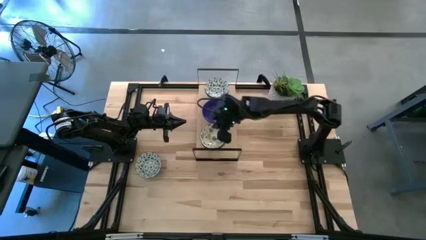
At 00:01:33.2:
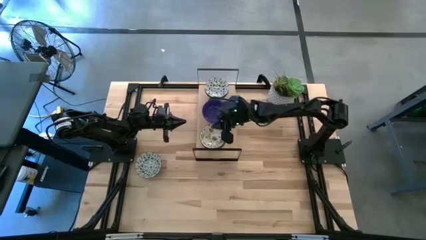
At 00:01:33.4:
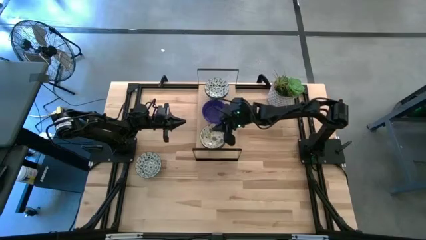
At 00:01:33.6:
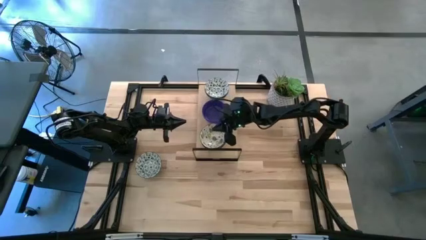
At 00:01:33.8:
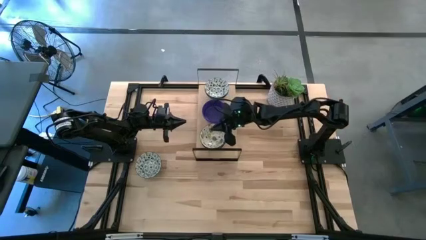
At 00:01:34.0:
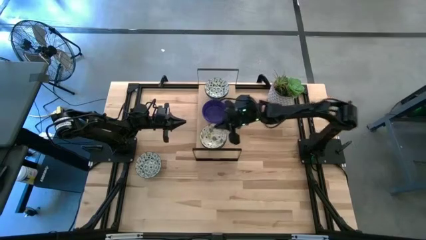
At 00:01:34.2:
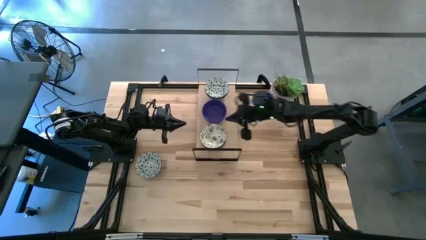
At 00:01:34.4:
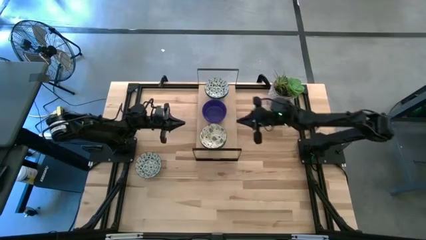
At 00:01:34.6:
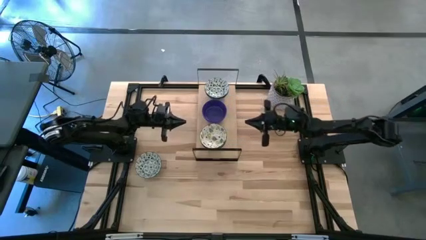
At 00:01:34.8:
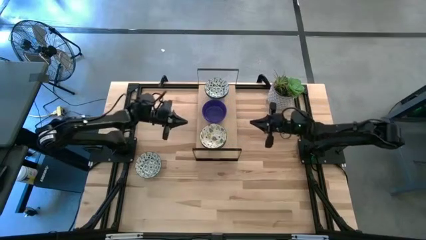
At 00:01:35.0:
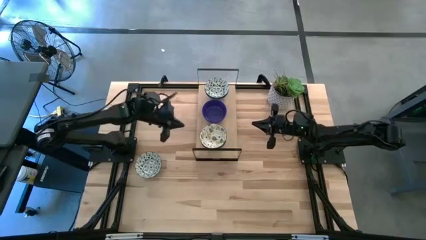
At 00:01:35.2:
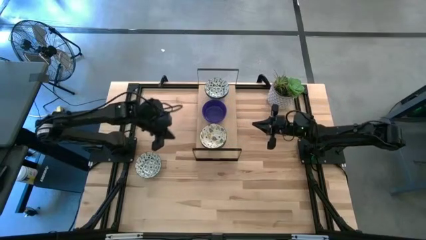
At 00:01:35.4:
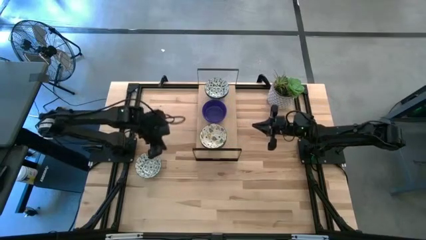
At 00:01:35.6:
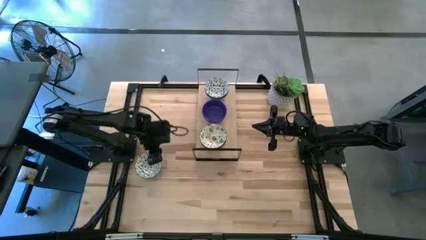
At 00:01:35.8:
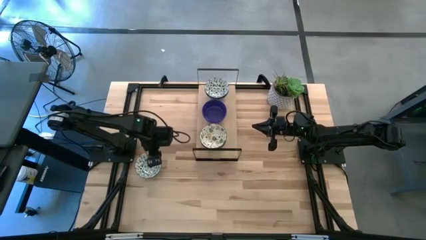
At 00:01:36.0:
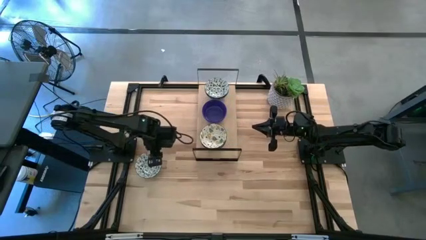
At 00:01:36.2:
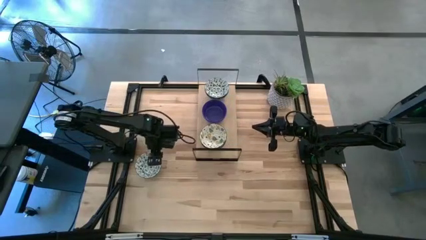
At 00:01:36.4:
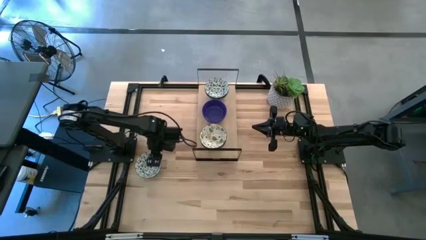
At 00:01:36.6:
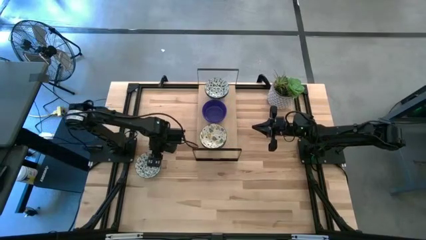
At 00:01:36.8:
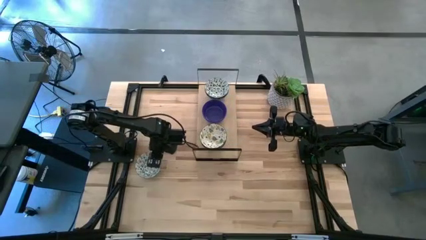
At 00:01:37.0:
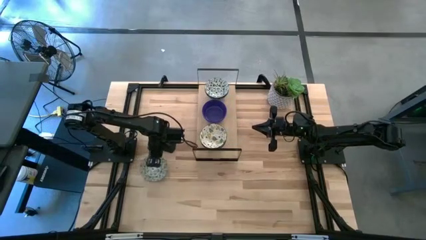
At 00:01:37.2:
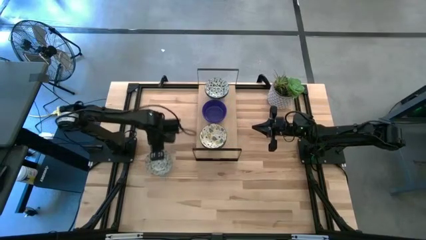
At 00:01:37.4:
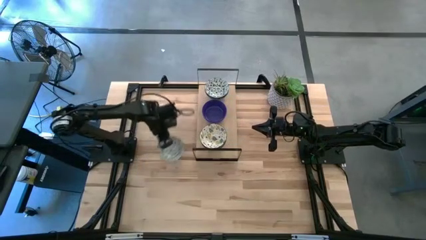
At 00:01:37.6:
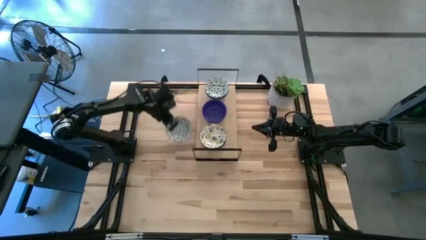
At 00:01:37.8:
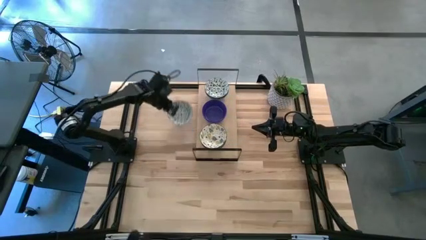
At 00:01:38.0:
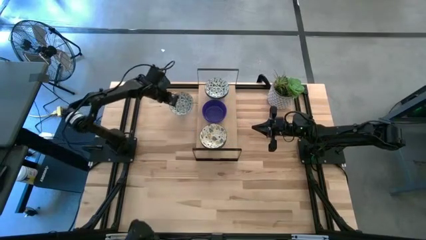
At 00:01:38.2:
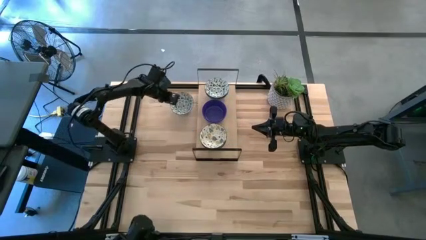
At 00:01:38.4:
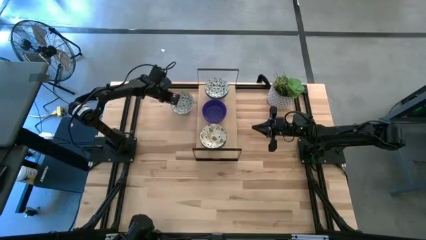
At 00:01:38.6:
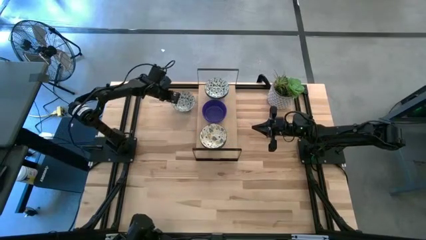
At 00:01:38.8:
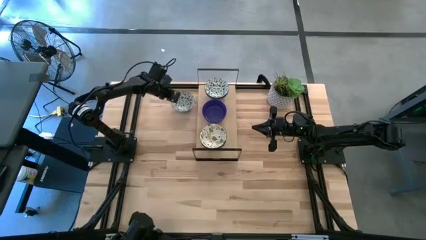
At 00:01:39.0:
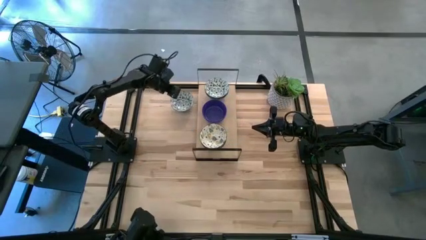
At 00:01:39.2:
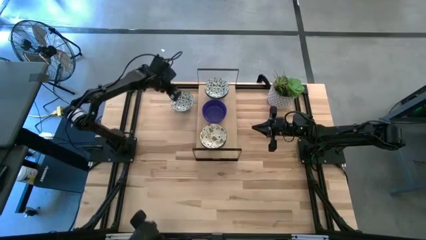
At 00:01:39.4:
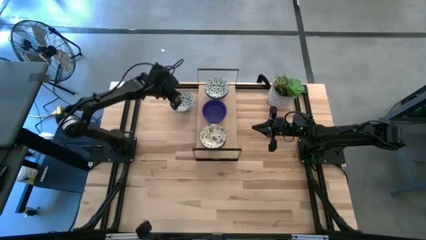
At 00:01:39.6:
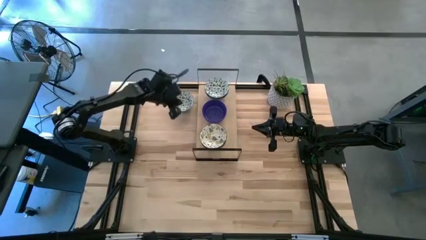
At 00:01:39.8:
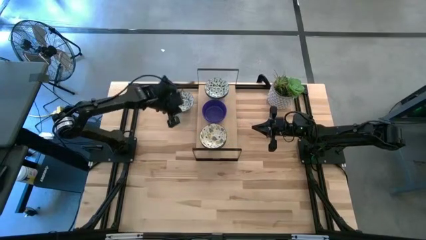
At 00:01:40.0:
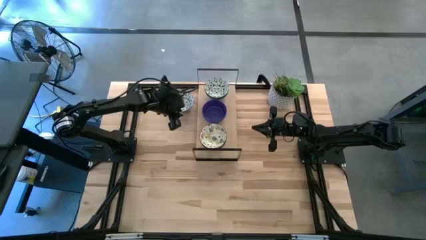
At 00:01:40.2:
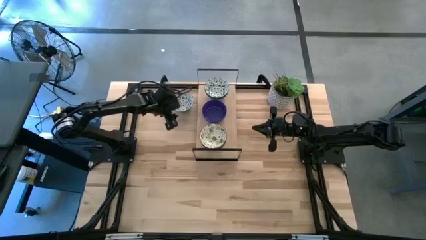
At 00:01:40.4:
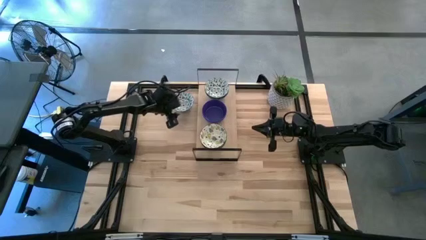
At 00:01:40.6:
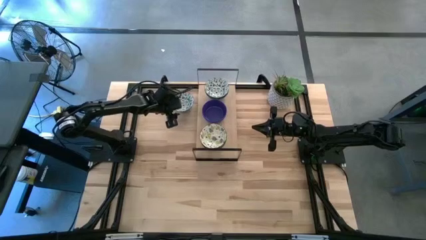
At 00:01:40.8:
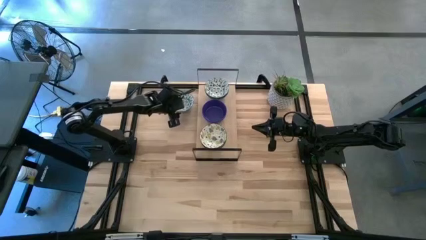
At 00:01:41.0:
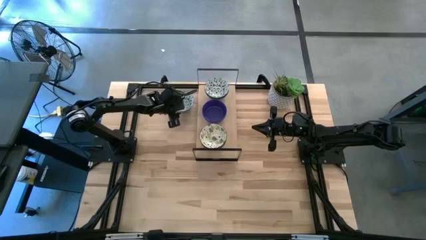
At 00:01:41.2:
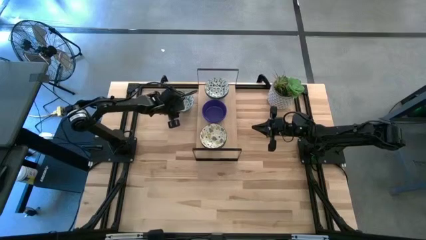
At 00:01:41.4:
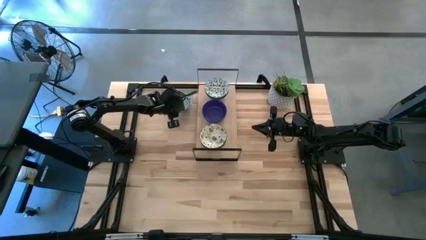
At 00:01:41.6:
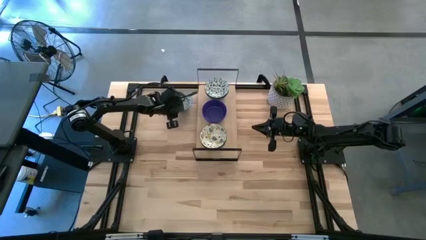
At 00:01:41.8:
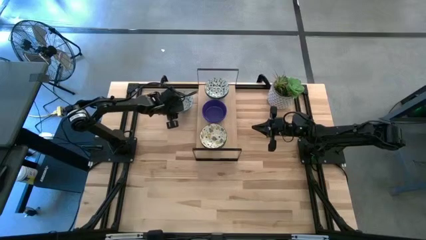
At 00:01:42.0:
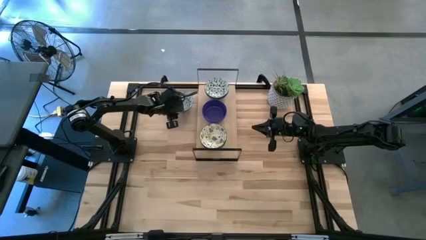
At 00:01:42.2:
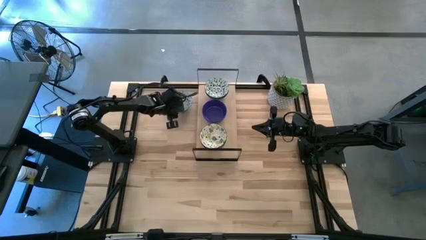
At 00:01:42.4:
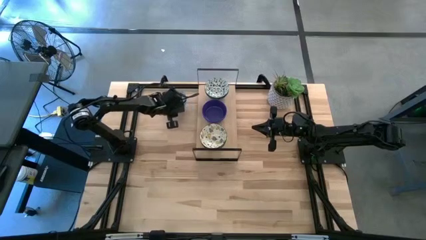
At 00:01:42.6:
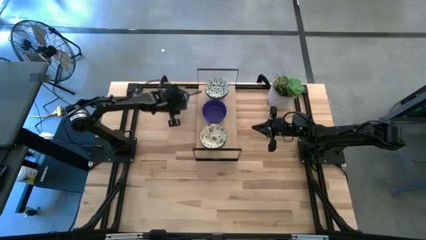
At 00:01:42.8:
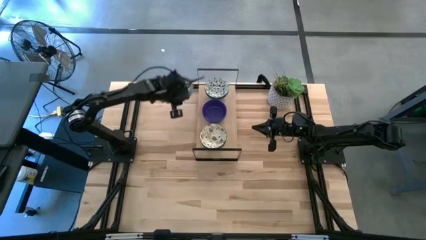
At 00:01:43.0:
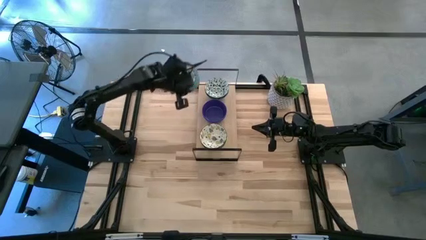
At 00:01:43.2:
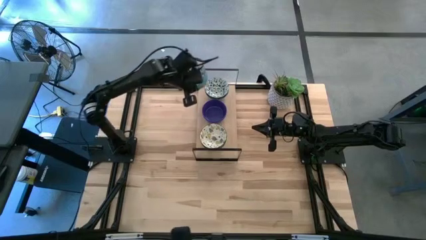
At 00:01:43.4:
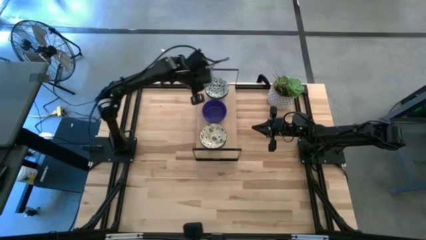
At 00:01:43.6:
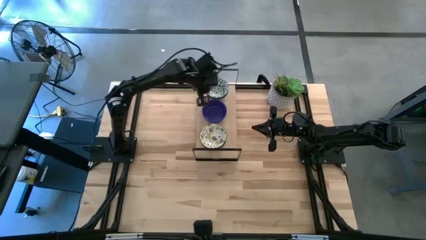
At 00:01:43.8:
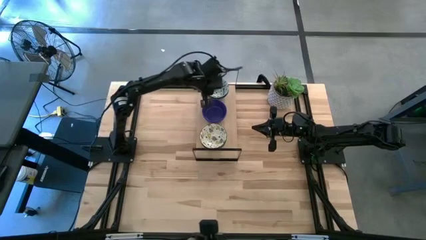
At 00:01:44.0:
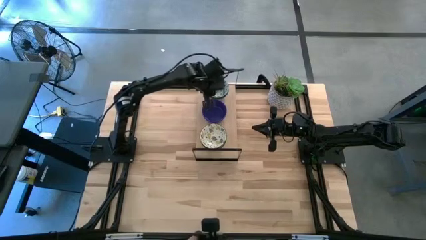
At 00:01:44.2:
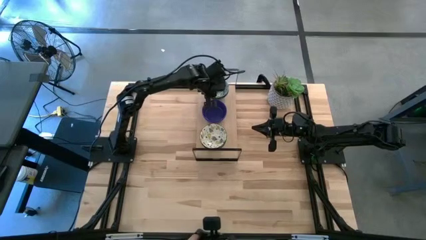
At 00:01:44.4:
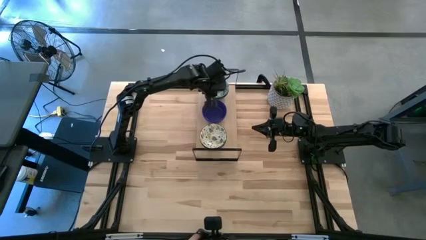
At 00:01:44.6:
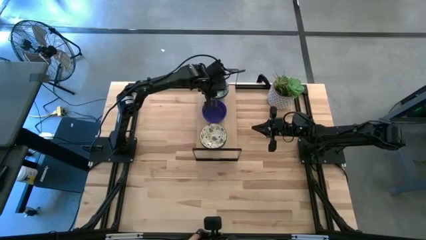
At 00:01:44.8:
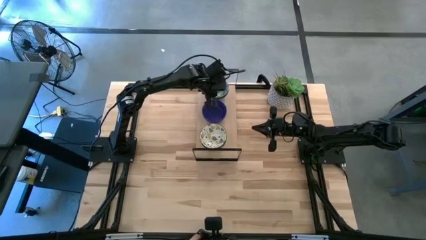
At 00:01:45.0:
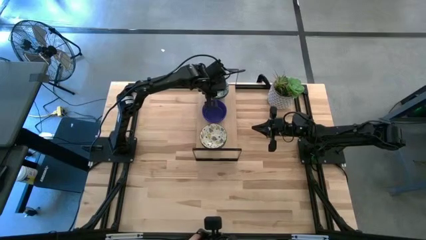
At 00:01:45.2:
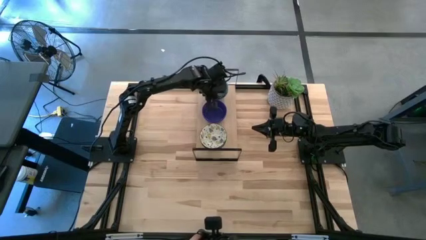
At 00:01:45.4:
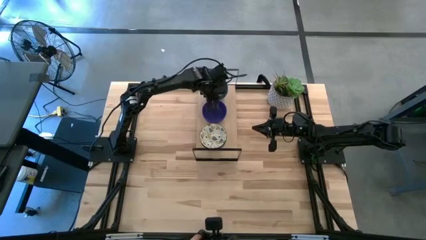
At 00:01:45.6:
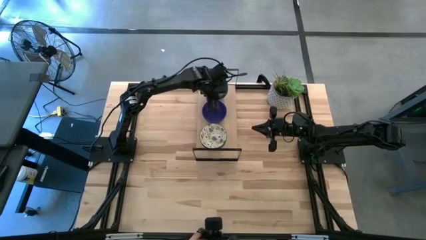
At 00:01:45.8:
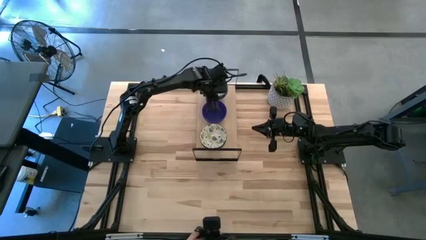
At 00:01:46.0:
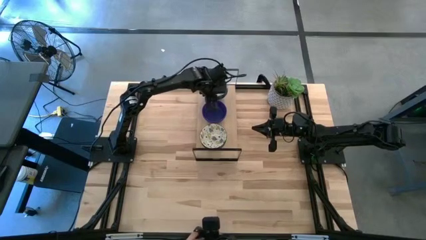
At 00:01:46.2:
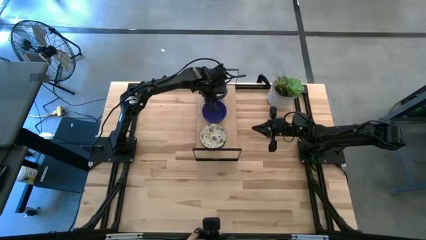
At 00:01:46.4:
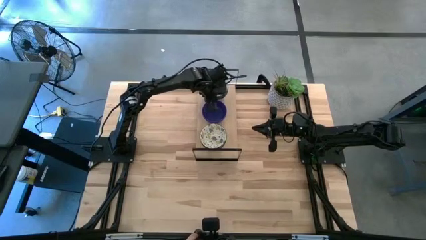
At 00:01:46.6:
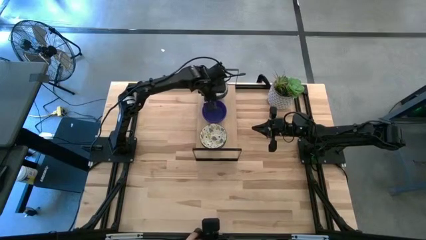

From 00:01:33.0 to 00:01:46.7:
Task: Pick & Place Mini bowls
Stack the blue patterned bowl on top of the stacked blue patterned bowl on the shelf
